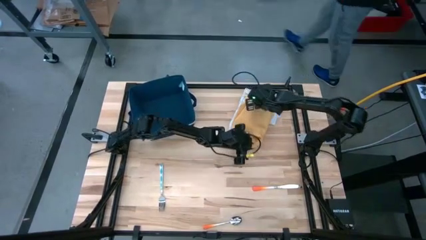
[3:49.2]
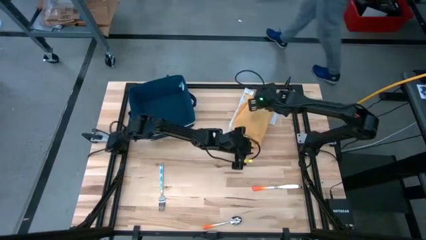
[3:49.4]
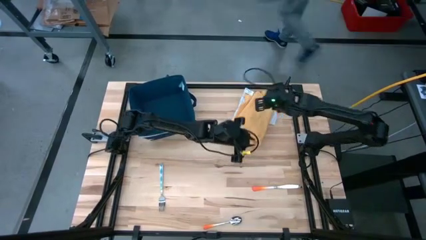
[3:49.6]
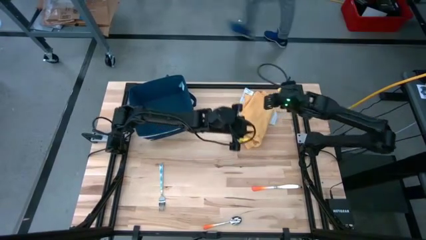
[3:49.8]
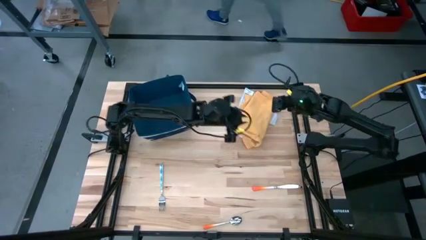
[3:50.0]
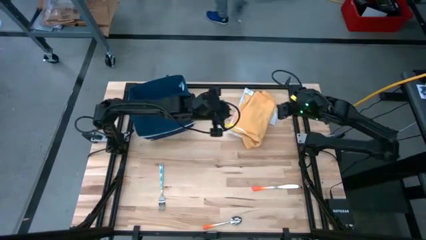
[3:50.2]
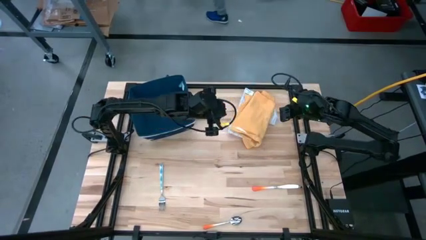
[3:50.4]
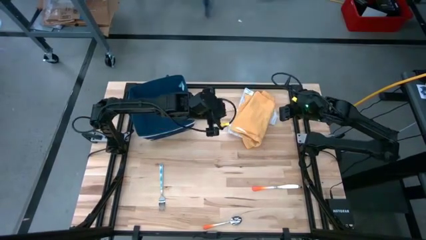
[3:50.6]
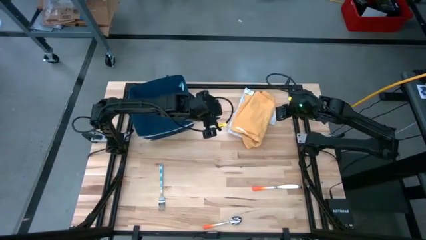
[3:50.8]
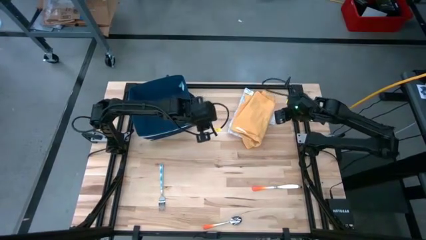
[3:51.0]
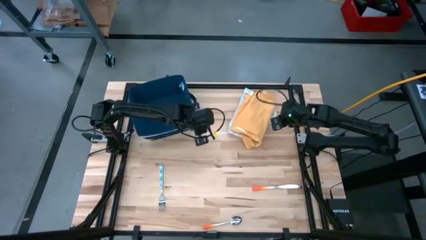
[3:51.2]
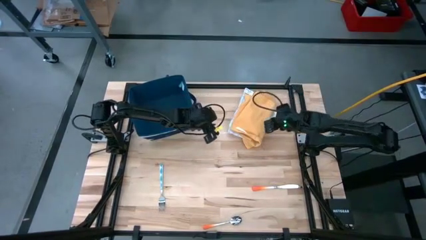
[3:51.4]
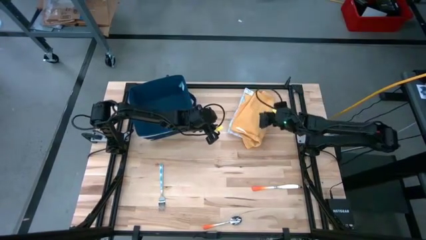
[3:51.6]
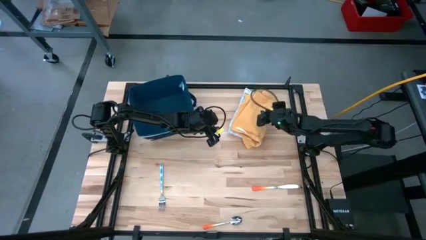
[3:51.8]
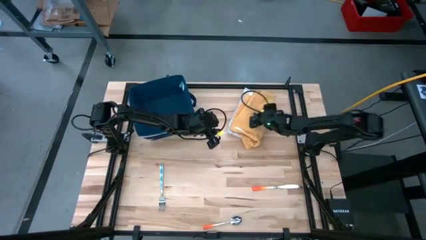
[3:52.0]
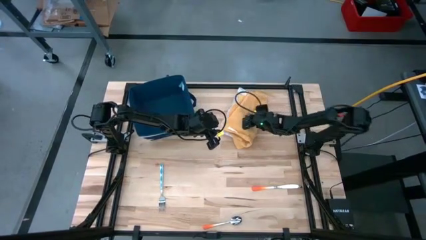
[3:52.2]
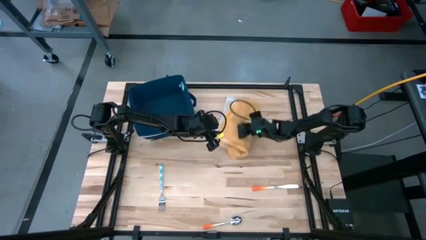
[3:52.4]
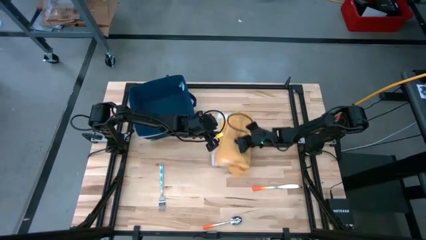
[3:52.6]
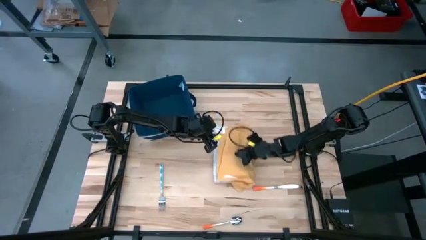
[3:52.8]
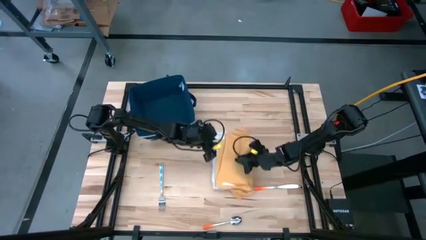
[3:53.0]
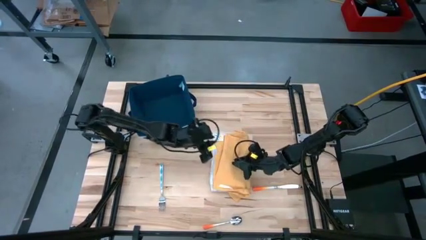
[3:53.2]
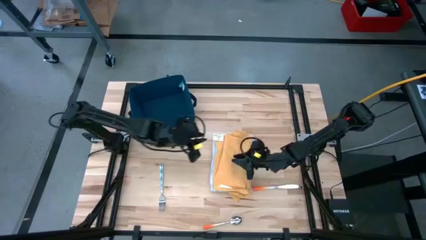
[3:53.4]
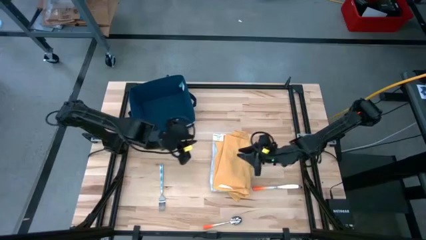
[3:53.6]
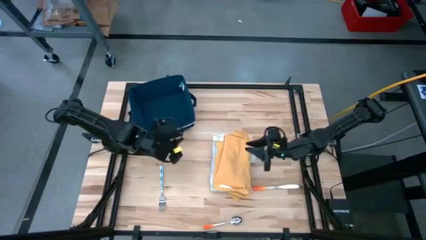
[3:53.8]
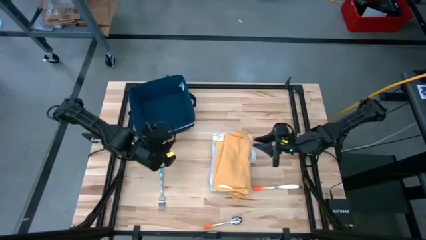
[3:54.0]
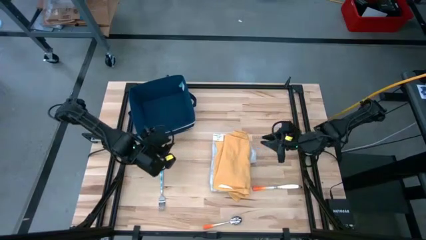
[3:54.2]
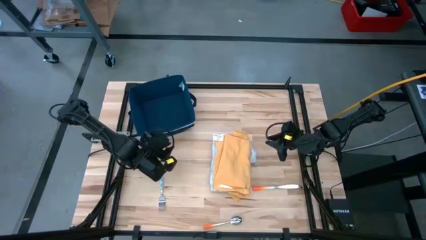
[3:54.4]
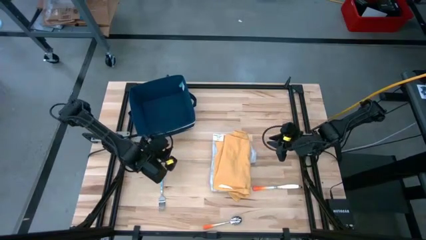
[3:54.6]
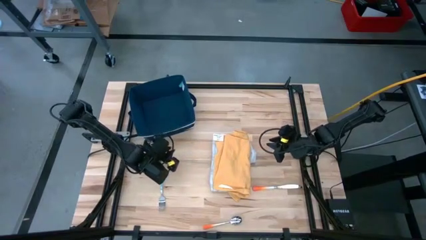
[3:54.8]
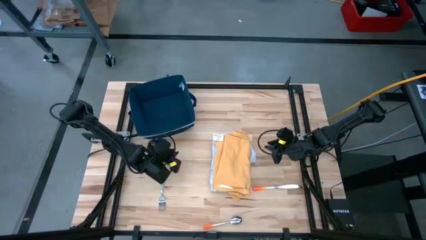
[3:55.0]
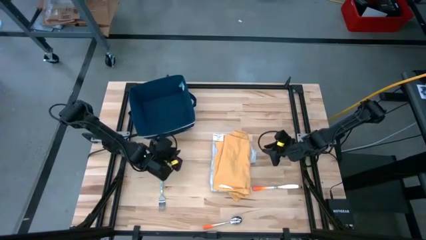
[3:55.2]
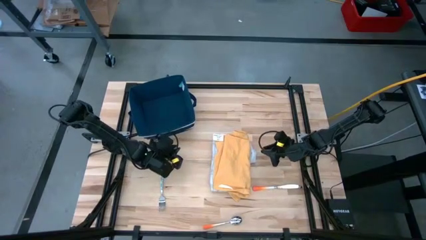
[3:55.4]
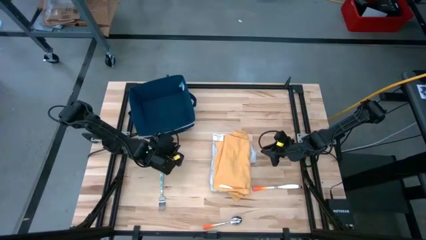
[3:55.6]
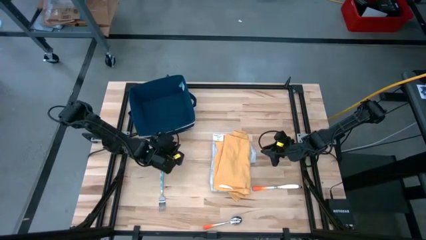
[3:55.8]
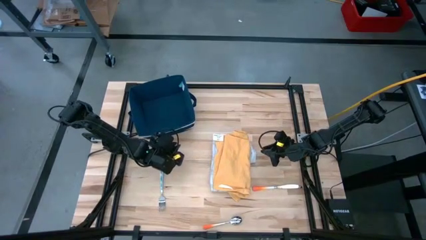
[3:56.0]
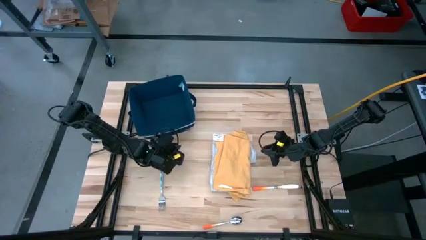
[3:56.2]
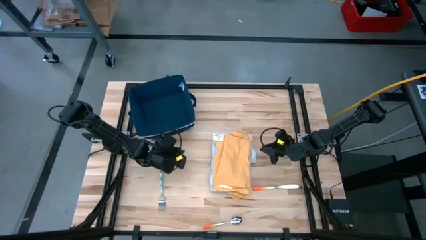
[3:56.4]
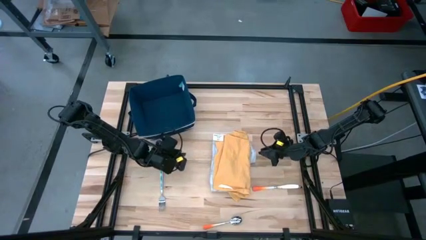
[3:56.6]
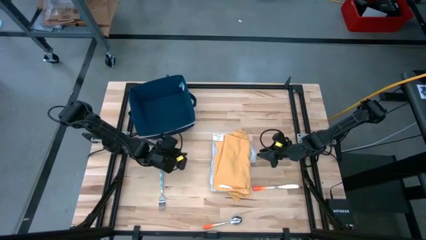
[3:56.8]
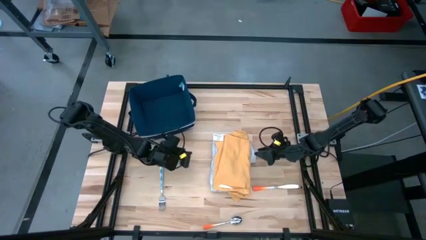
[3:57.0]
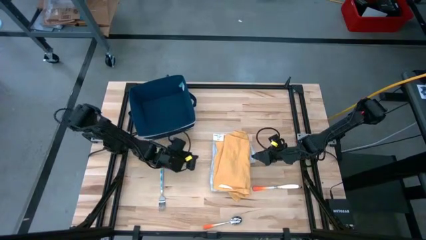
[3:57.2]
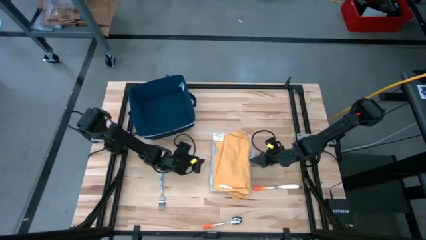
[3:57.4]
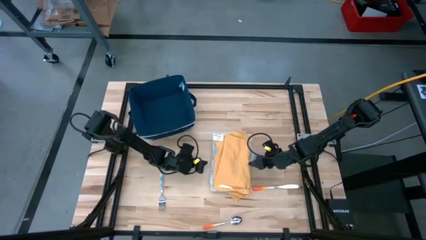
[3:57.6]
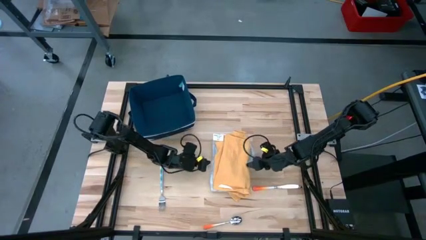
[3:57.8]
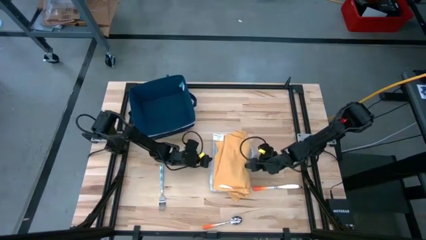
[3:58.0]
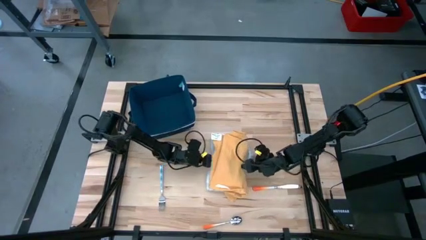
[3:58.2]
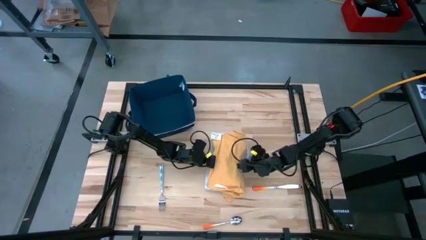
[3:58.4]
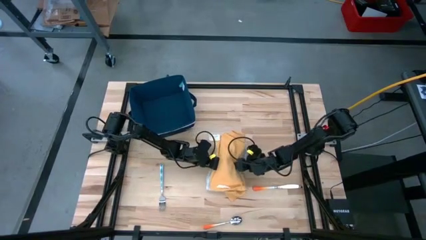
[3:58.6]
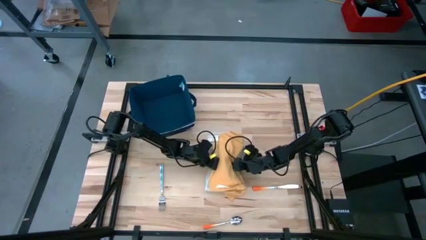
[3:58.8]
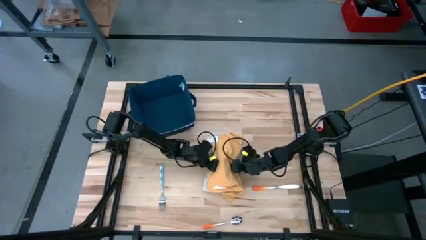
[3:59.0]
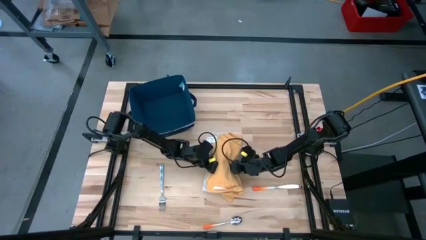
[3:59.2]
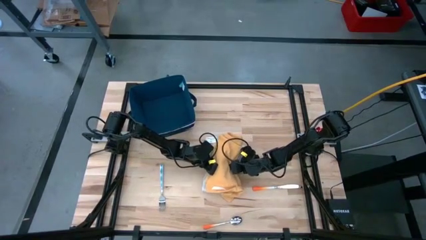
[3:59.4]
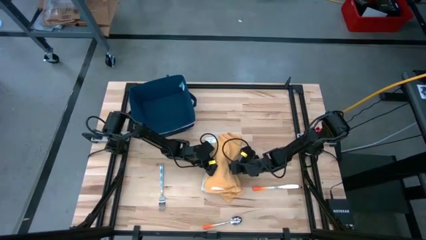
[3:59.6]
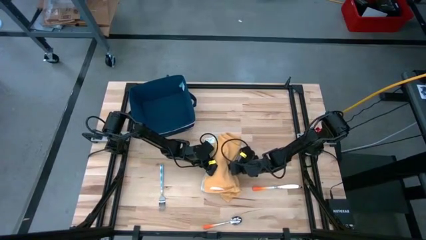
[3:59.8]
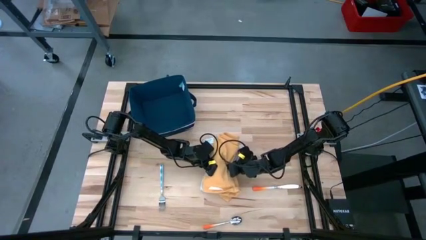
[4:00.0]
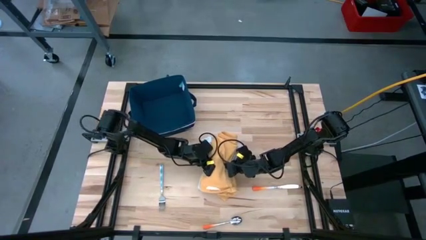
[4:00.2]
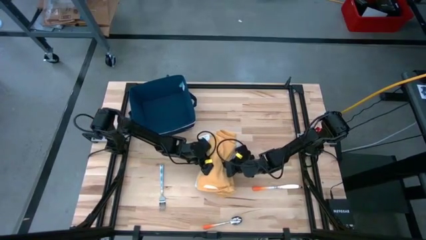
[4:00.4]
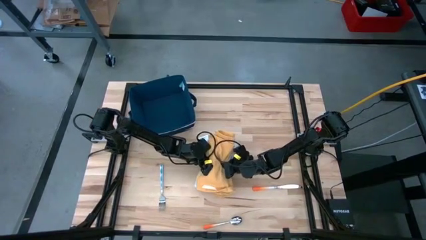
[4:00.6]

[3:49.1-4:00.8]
Task: Fold towel
Put the stacked towels into the blue laundry organizer

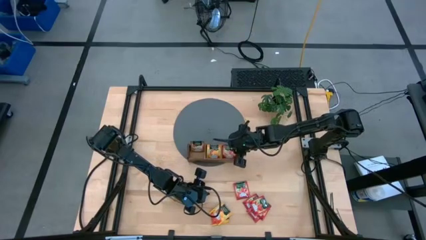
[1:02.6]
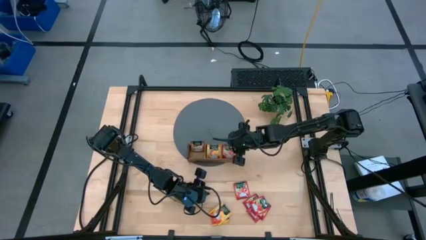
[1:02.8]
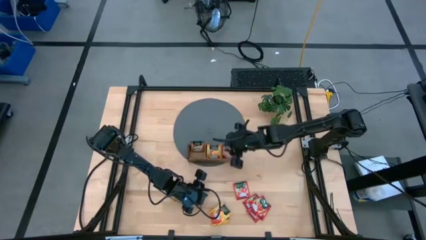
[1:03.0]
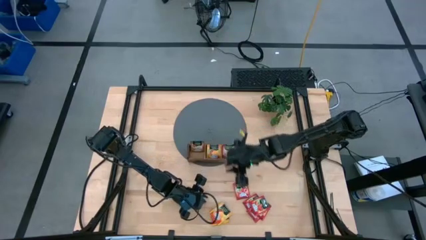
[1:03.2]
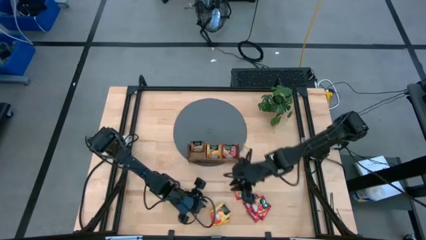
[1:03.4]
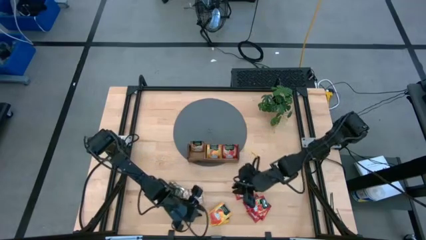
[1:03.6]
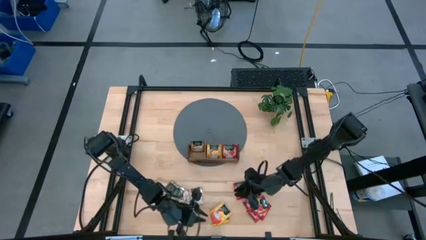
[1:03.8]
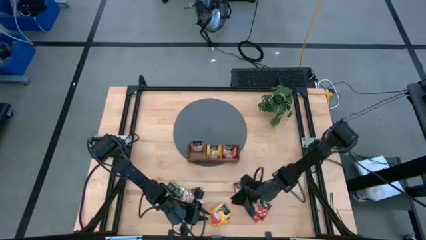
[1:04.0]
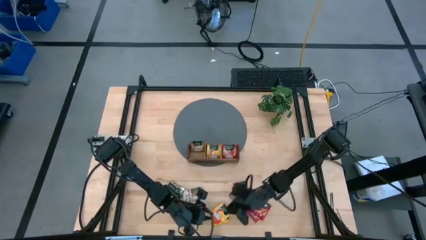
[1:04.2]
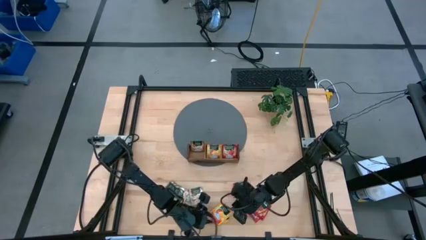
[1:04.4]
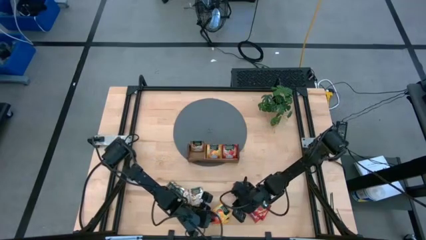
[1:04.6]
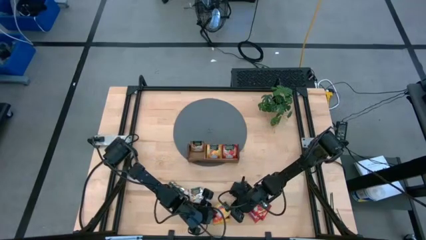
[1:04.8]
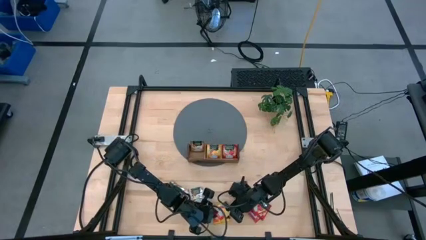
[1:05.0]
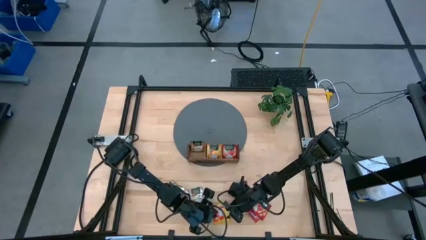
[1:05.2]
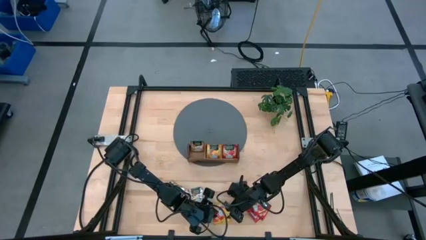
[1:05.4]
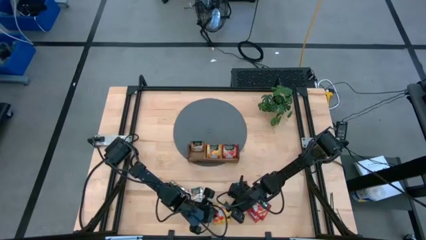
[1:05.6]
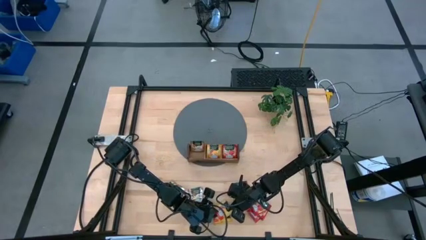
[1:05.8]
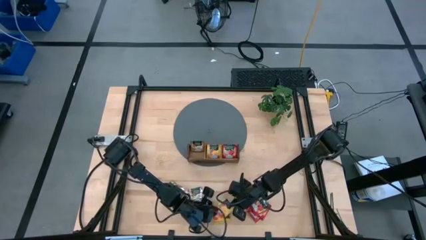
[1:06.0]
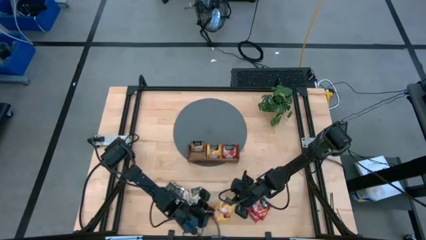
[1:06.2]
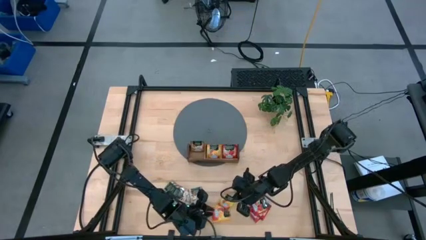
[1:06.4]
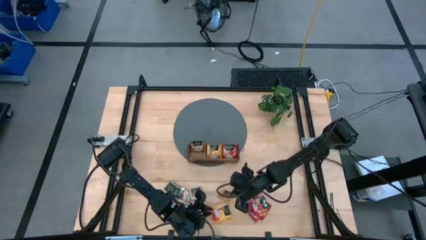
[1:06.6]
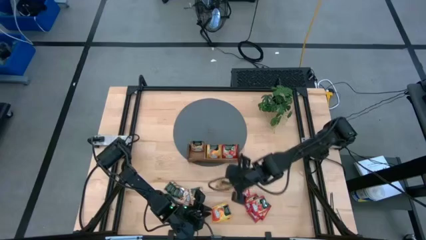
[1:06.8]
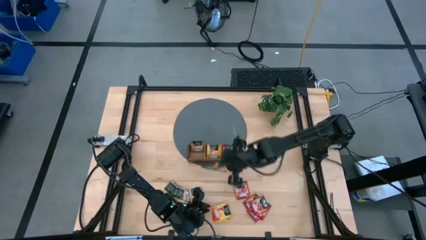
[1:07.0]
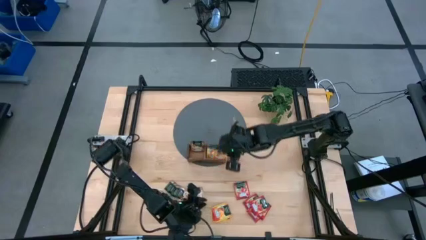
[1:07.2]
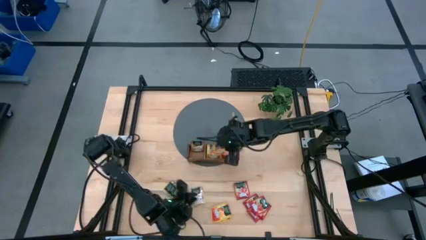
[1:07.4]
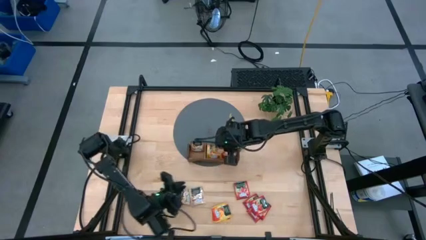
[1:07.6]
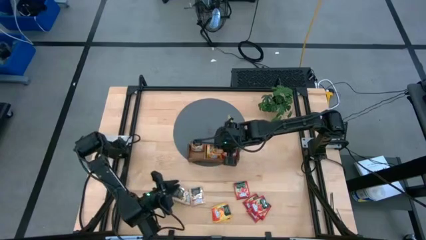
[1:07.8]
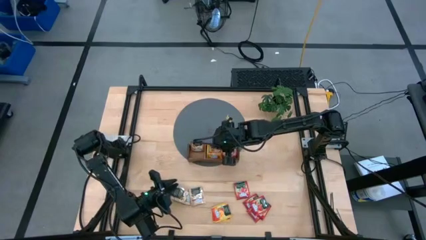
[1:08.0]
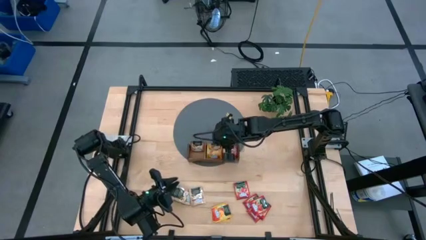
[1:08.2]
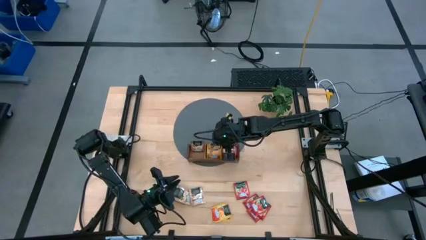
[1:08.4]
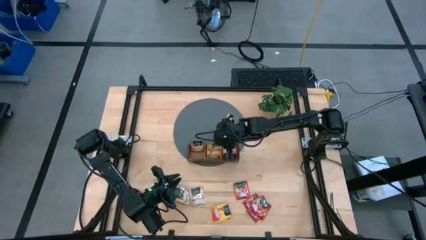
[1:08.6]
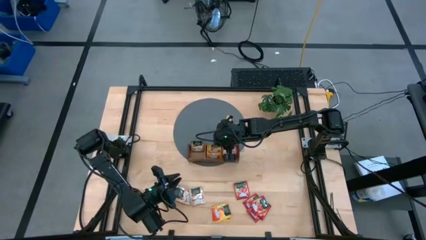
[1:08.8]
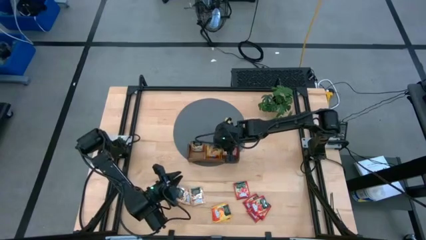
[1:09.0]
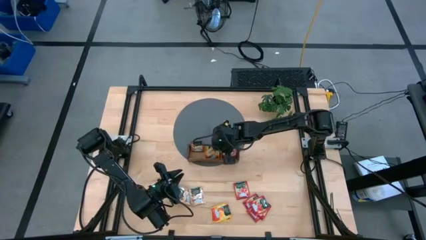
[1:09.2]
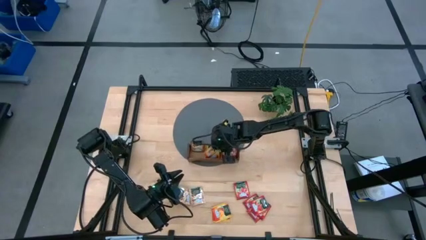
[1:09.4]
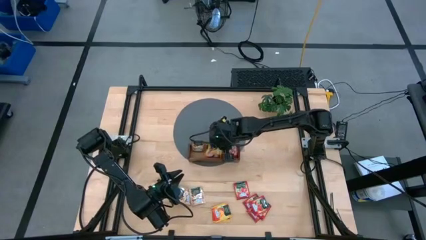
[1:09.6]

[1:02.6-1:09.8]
Task: Pick & Place Tea
Put the yellow tea bag into the middle section of the wooden organizer
